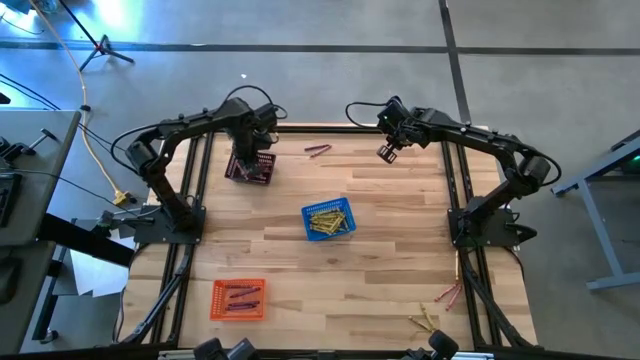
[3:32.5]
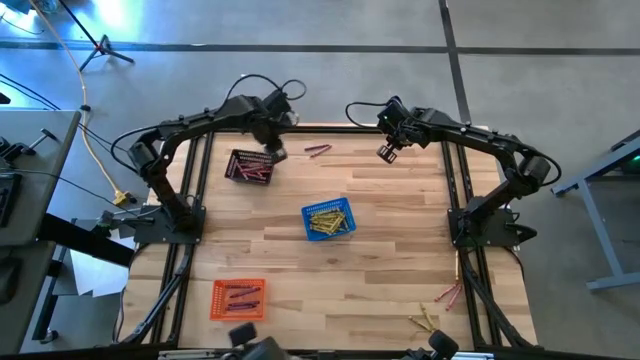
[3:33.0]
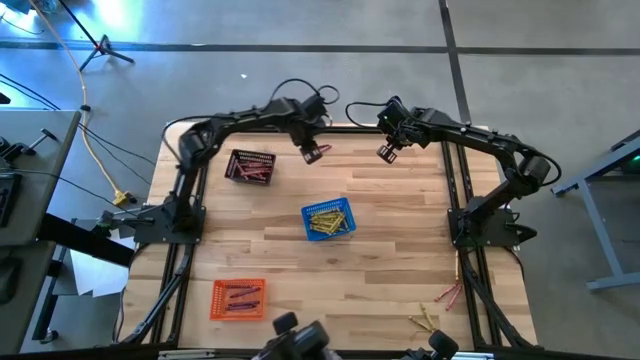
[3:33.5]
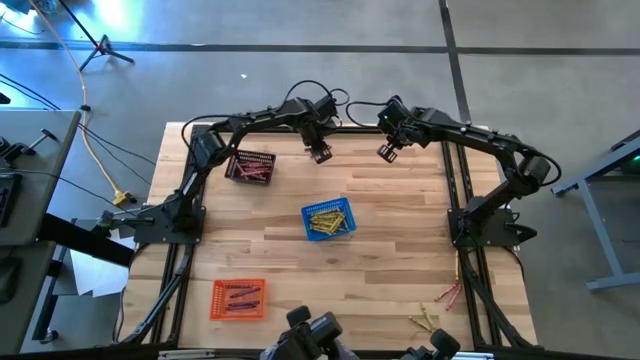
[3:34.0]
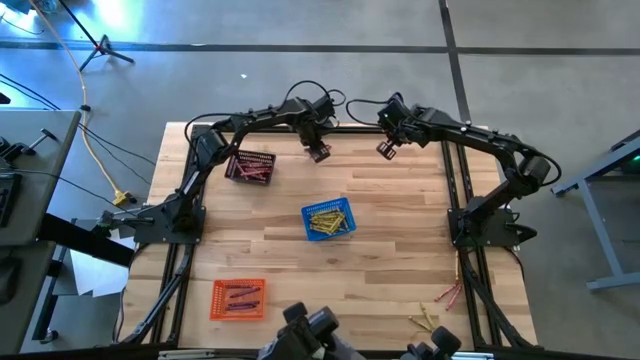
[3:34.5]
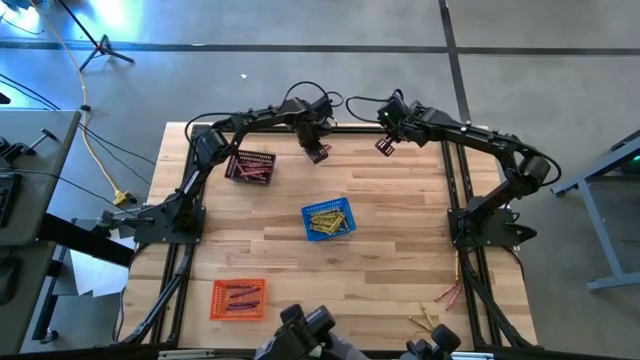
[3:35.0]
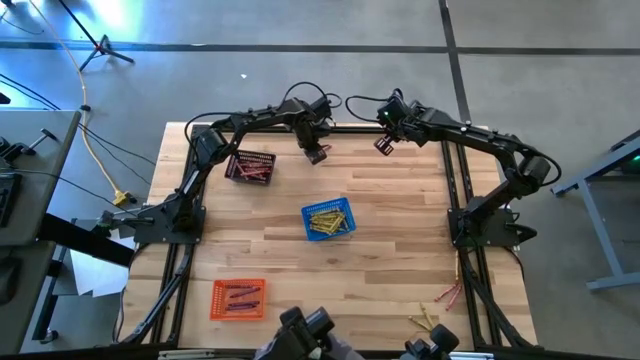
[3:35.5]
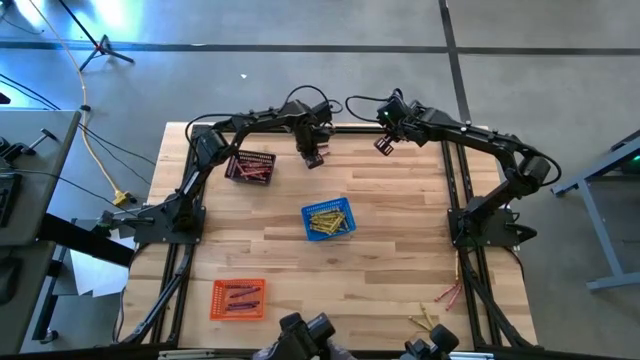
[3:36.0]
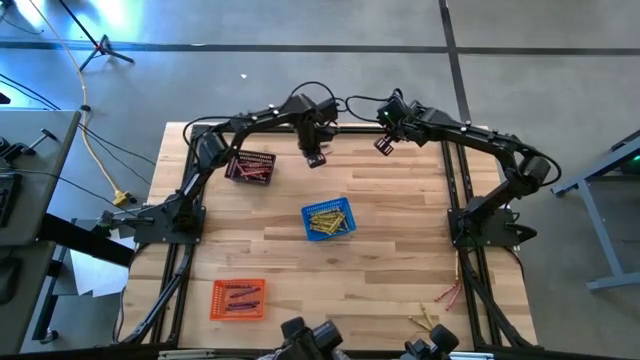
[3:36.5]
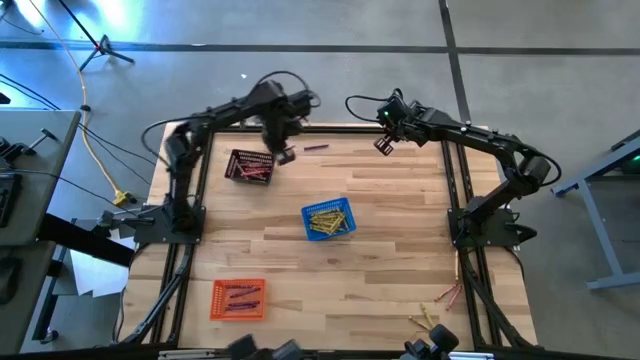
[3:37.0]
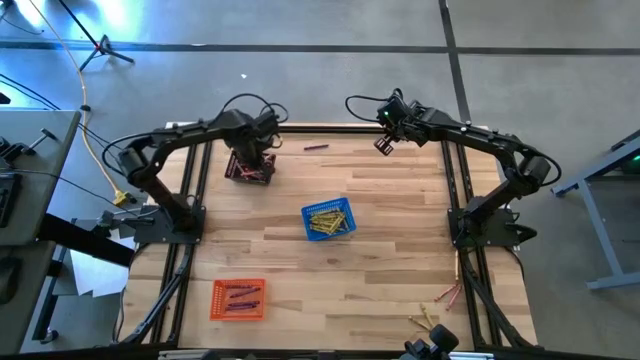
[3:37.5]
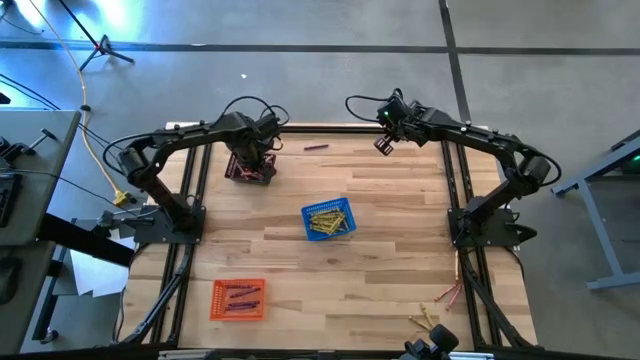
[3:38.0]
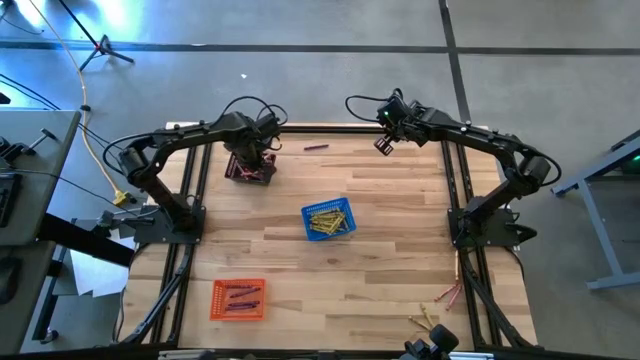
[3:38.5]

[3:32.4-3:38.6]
Task: Sort crayons
Put the red crayon into the black basket

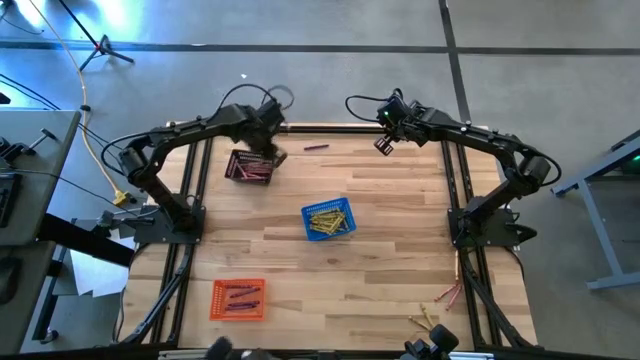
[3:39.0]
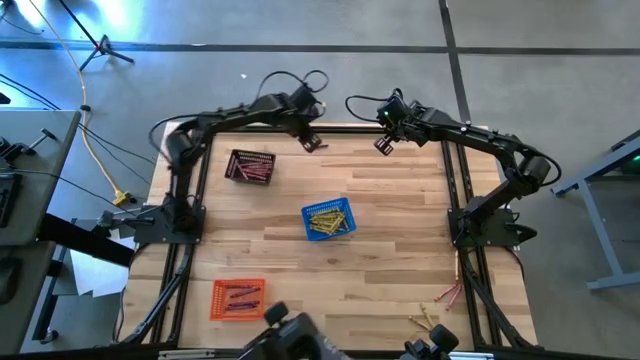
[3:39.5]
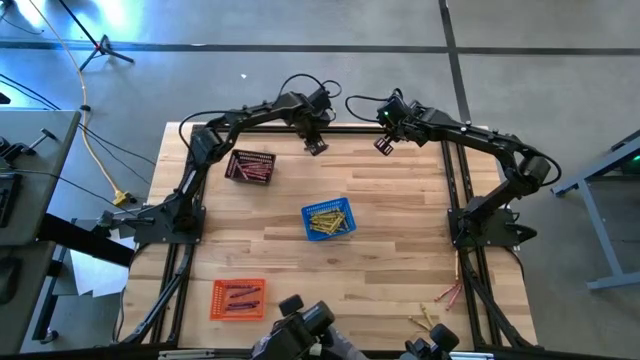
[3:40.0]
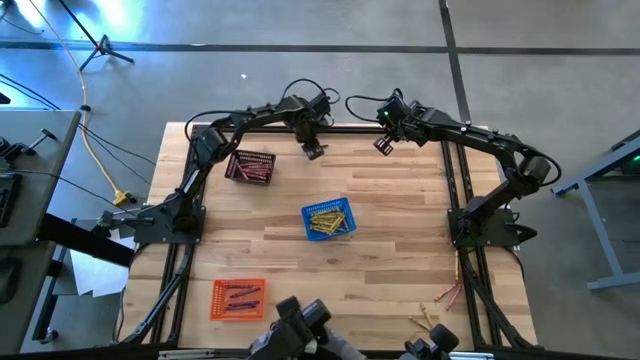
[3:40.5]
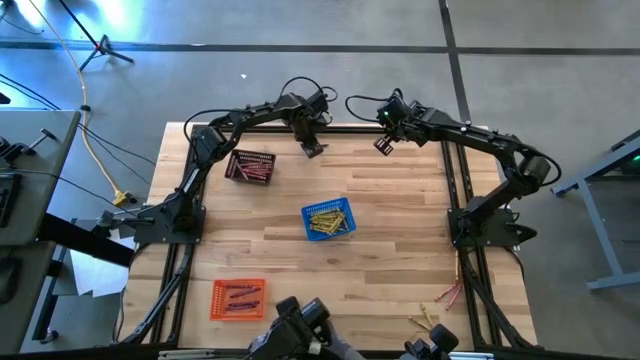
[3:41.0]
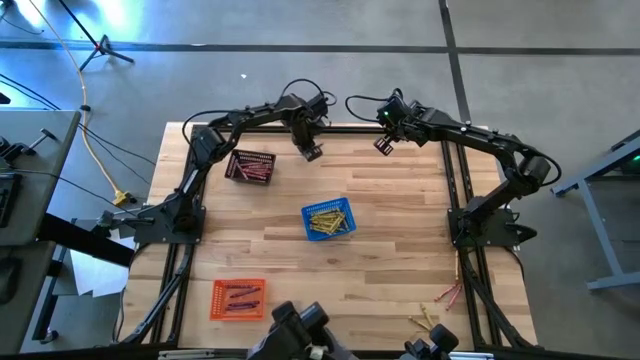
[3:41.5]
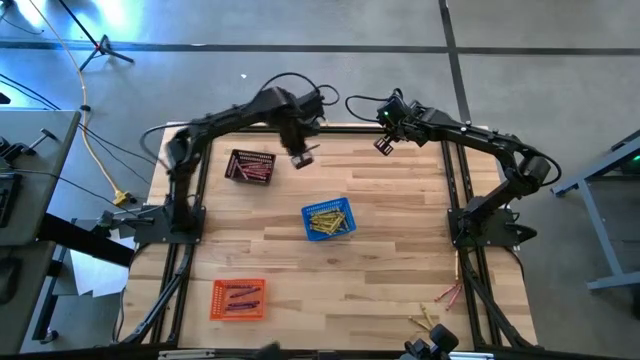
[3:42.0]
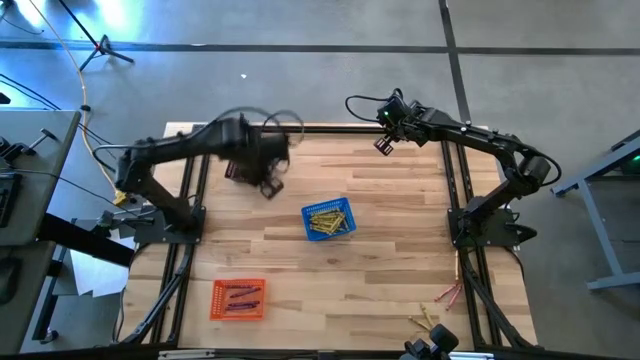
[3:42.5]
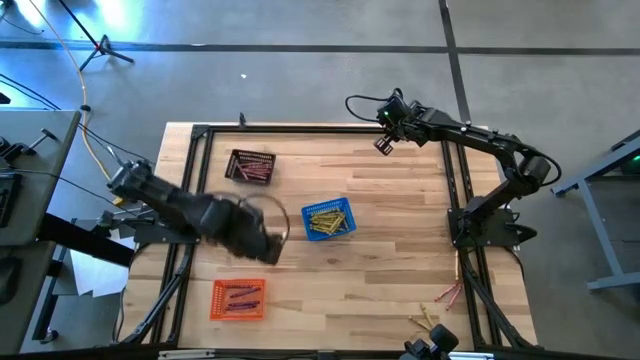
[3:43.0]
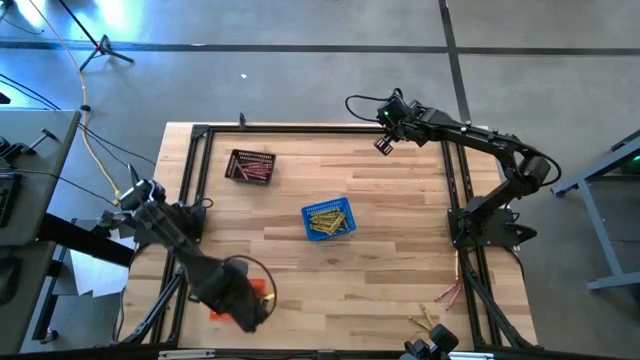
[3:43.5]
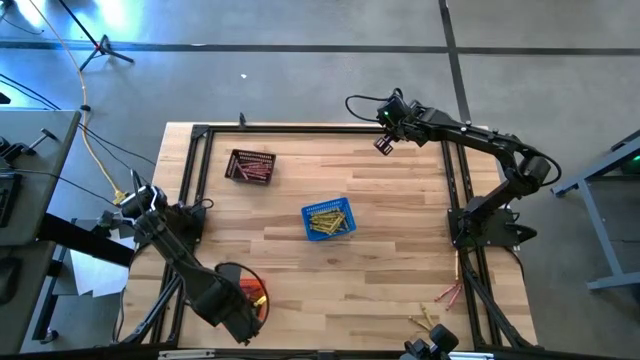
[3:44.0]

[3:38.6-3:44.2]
Put the violet crayon into the orange basket

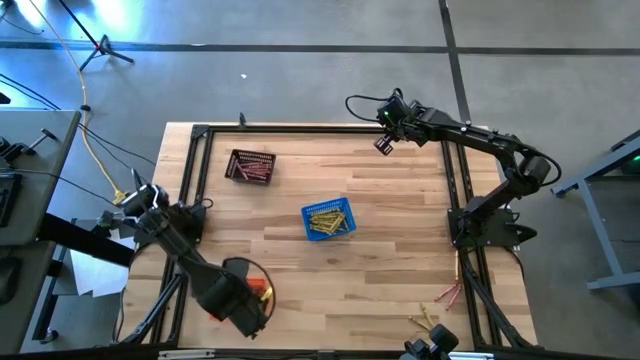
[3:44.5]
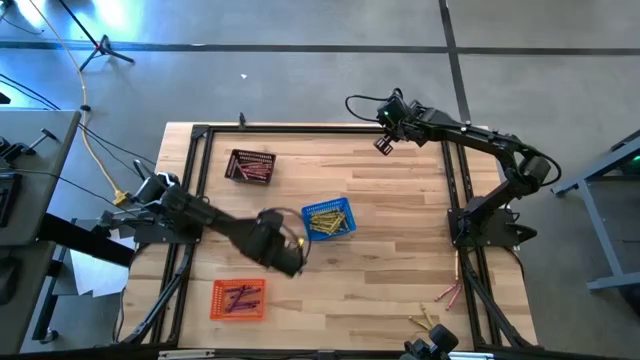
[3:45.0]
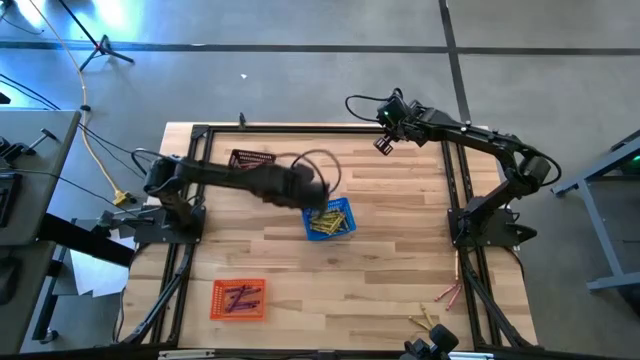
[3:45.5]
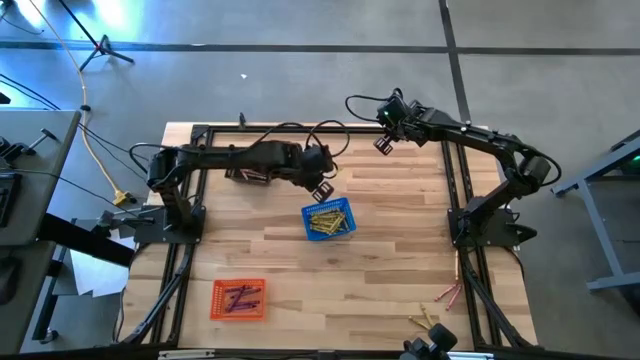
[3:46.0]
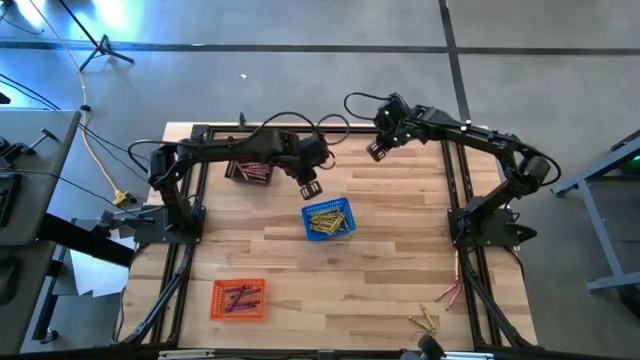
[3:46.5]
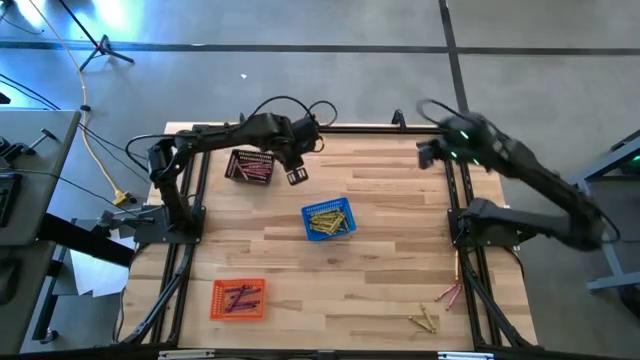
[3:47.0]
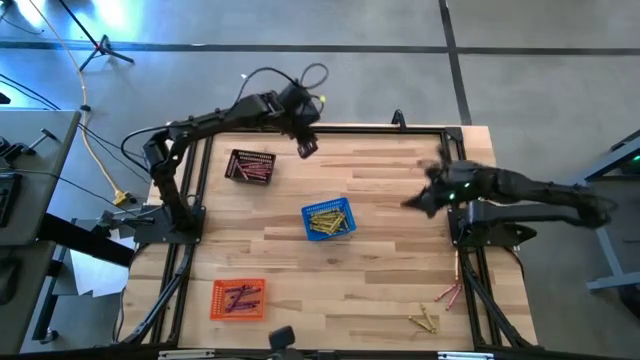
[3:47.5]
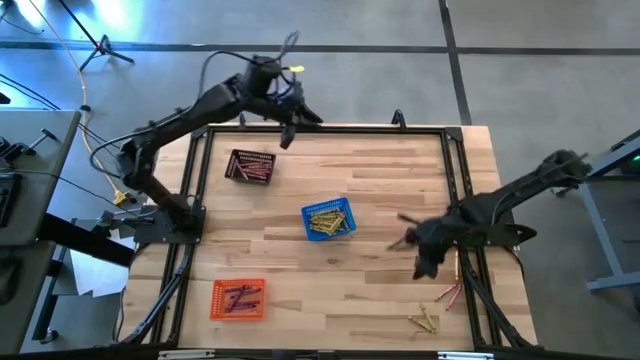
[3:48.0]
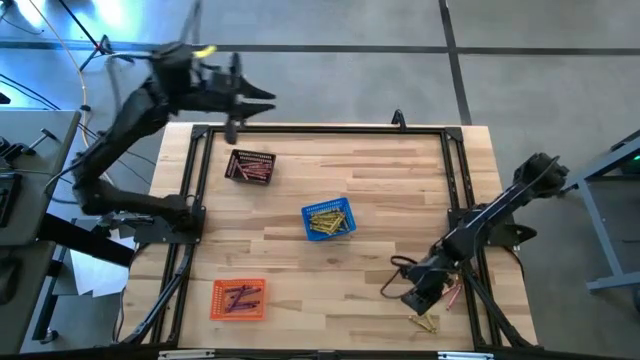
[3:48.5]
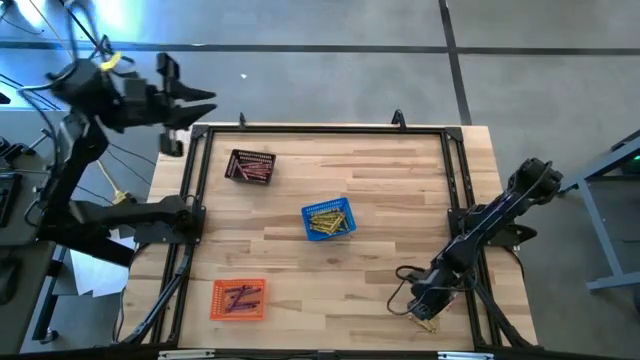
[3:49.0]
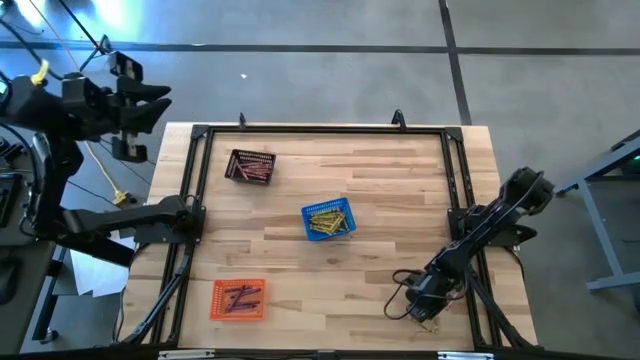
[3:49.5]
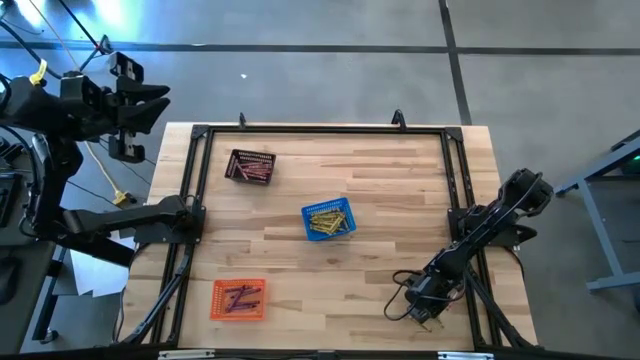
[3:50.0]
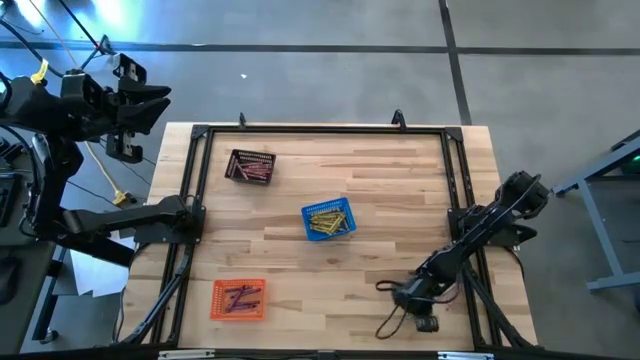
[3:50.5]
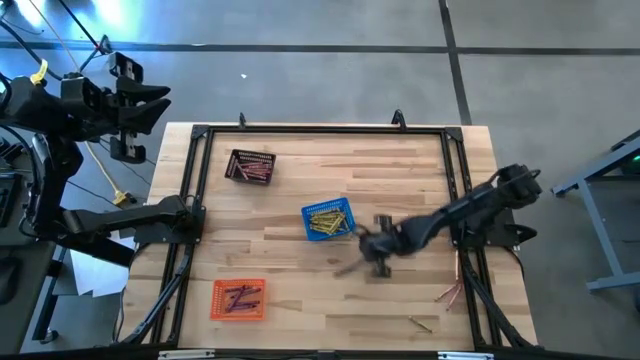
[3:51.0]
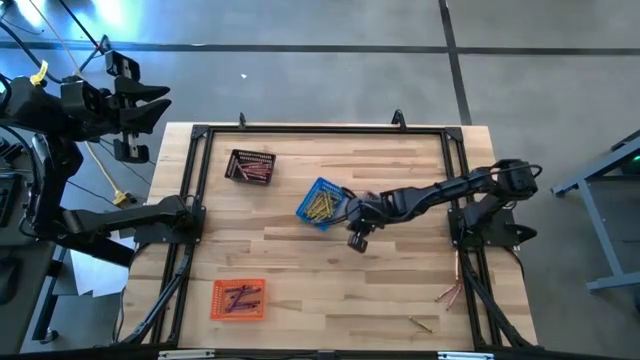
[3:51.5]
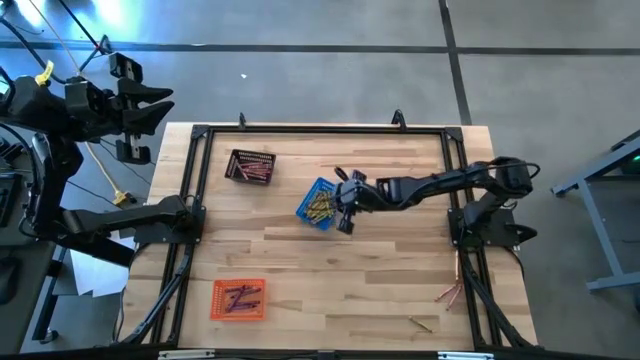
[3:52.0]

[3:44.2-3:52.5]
Put the yellow crayon into the blue basket
